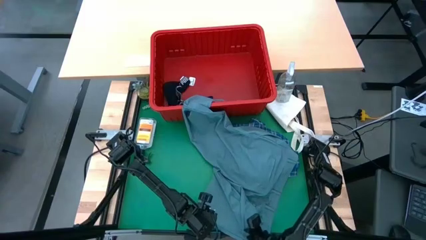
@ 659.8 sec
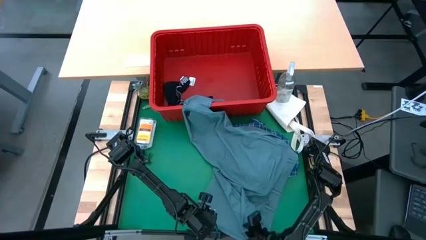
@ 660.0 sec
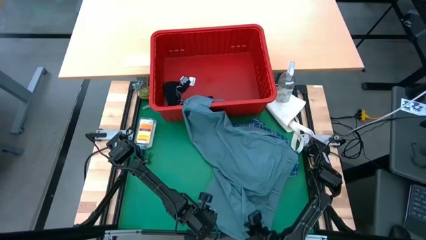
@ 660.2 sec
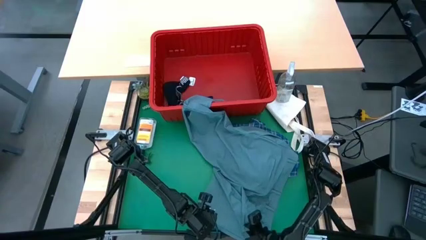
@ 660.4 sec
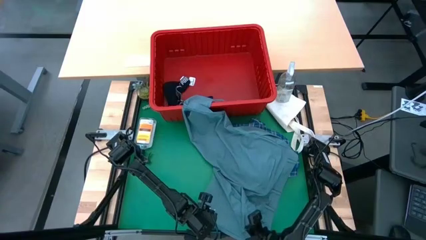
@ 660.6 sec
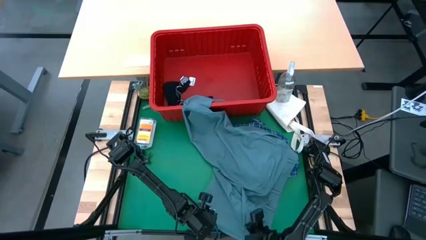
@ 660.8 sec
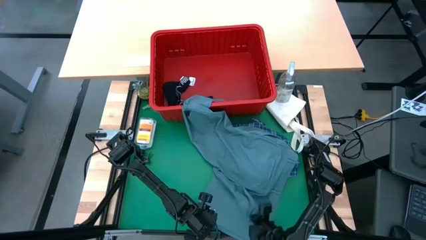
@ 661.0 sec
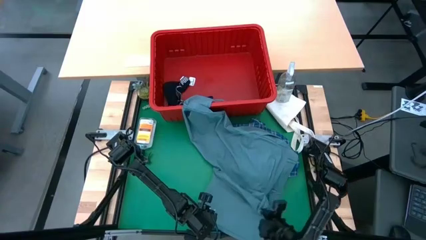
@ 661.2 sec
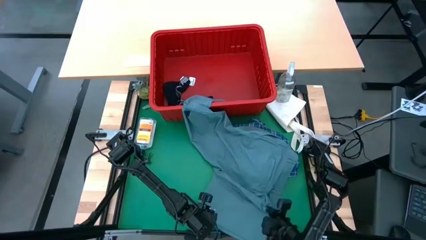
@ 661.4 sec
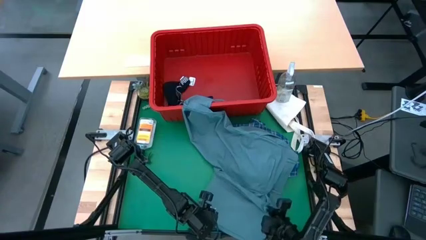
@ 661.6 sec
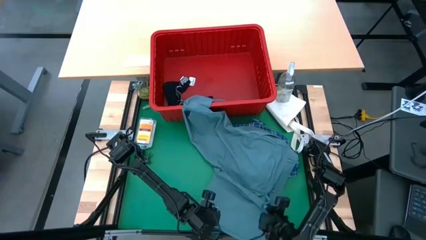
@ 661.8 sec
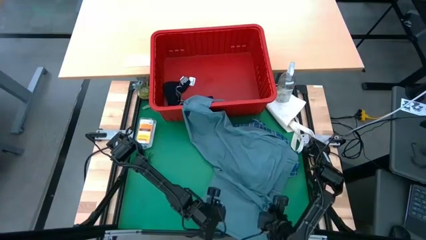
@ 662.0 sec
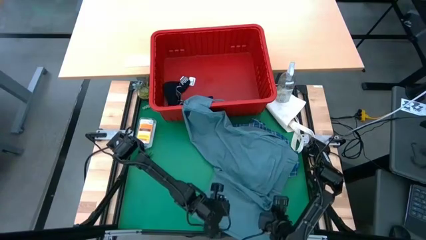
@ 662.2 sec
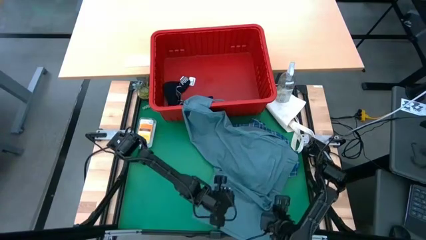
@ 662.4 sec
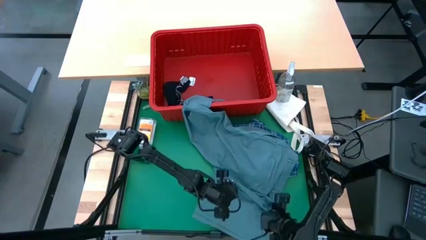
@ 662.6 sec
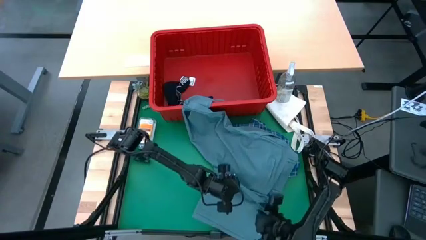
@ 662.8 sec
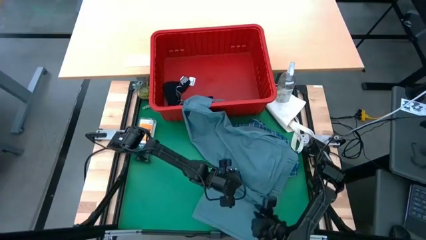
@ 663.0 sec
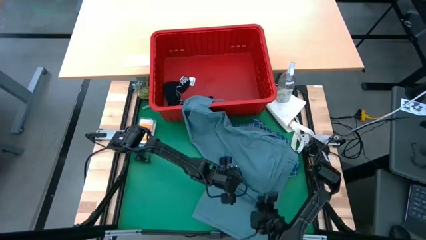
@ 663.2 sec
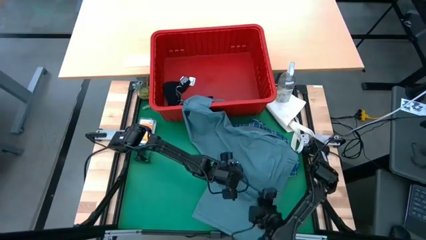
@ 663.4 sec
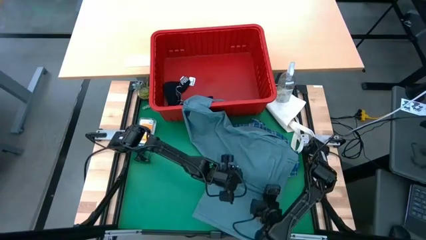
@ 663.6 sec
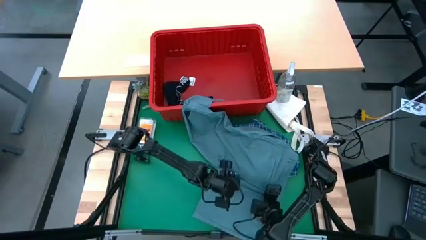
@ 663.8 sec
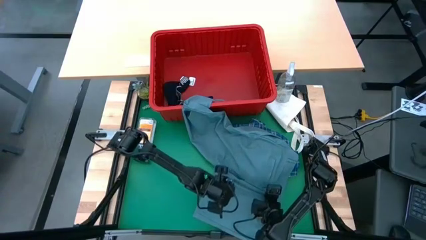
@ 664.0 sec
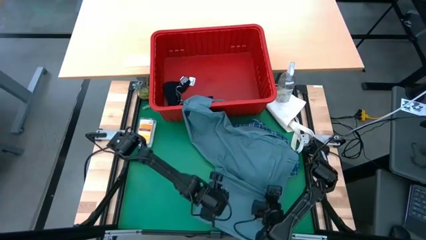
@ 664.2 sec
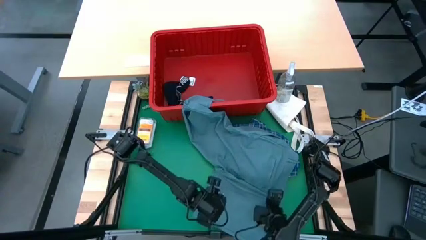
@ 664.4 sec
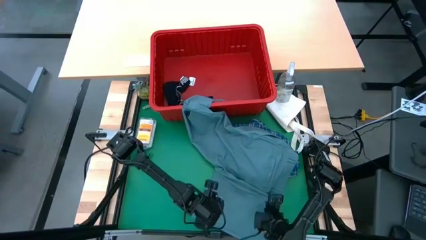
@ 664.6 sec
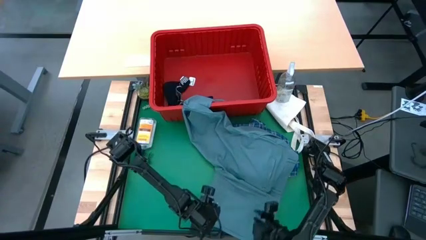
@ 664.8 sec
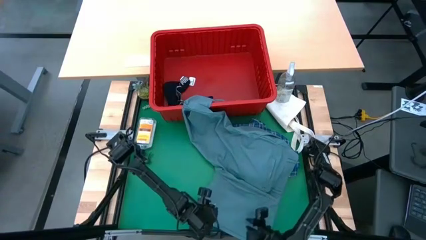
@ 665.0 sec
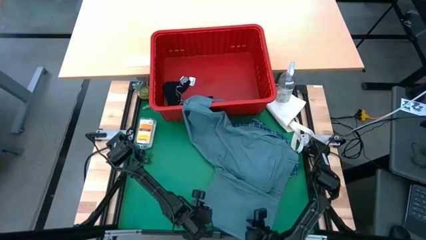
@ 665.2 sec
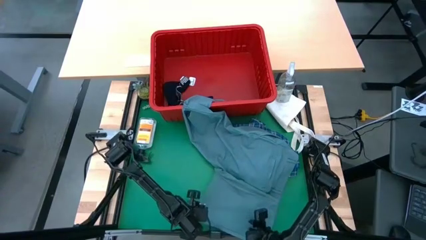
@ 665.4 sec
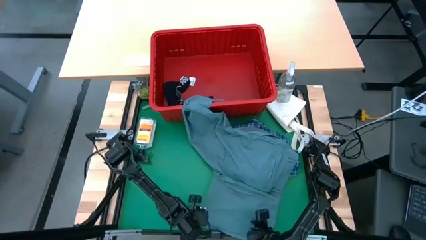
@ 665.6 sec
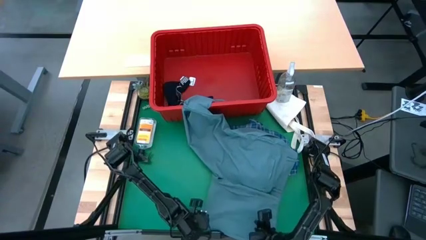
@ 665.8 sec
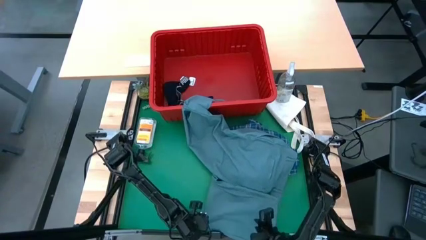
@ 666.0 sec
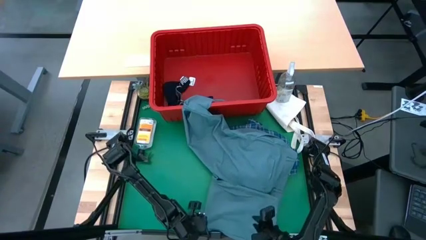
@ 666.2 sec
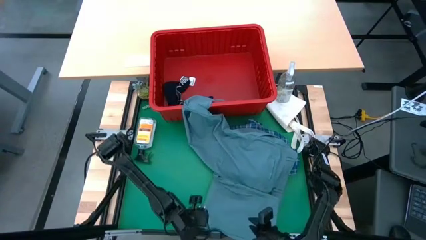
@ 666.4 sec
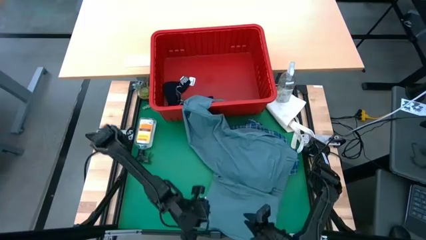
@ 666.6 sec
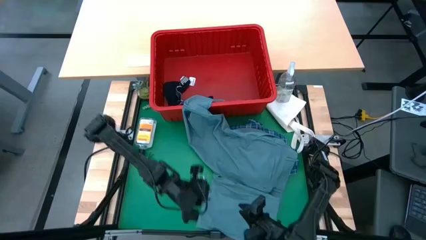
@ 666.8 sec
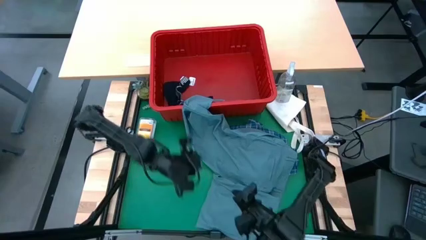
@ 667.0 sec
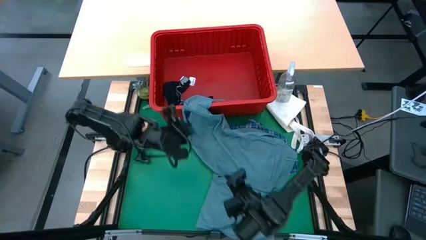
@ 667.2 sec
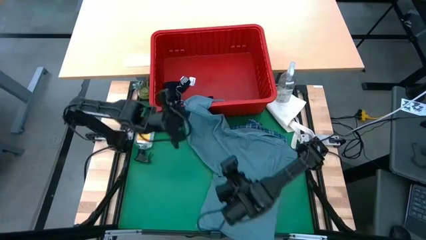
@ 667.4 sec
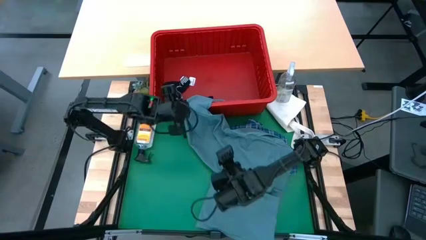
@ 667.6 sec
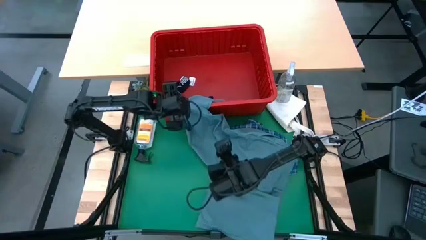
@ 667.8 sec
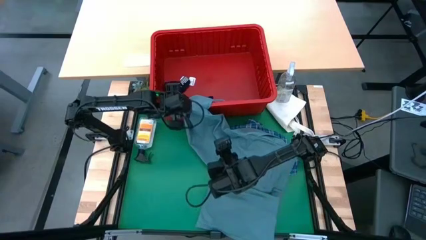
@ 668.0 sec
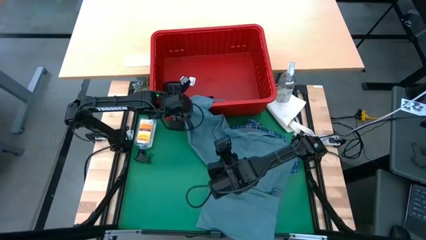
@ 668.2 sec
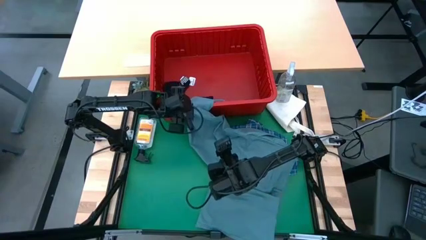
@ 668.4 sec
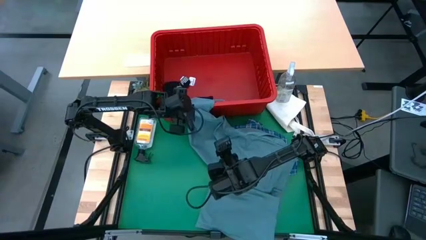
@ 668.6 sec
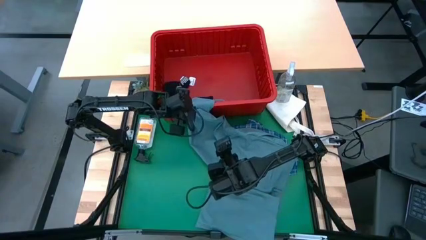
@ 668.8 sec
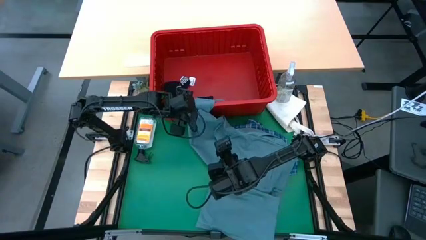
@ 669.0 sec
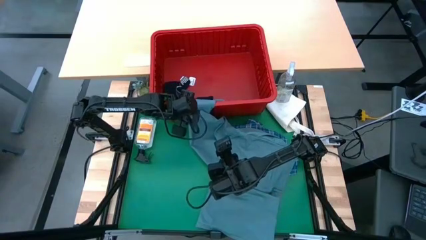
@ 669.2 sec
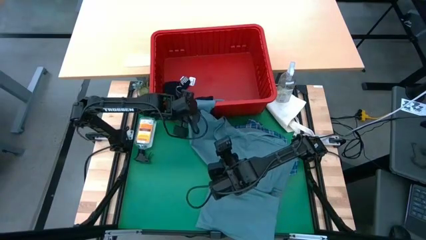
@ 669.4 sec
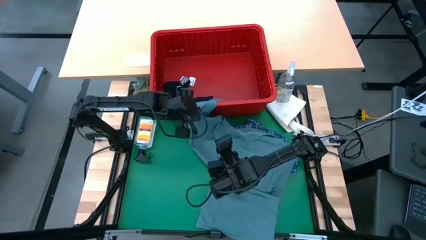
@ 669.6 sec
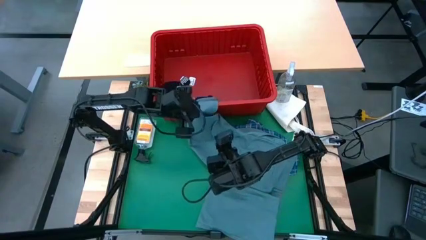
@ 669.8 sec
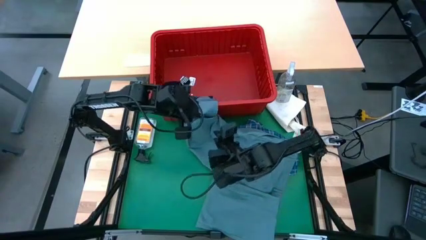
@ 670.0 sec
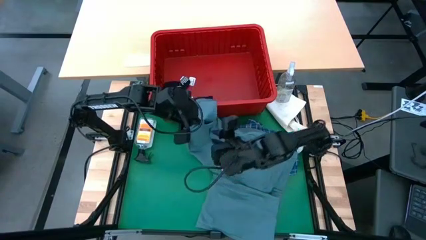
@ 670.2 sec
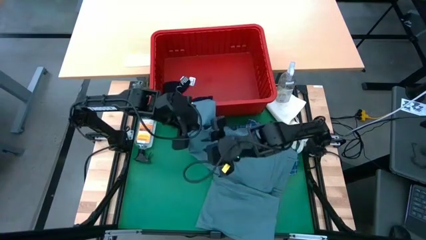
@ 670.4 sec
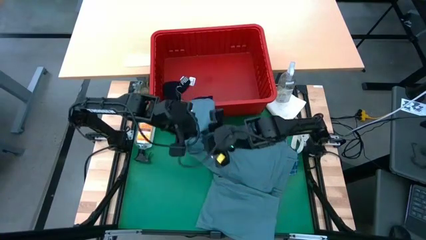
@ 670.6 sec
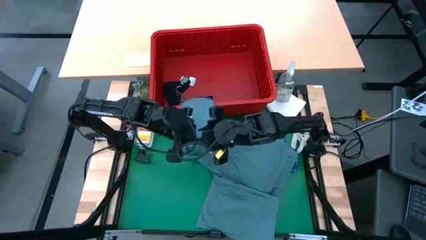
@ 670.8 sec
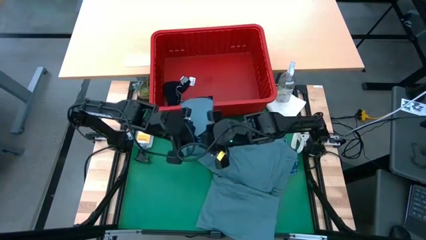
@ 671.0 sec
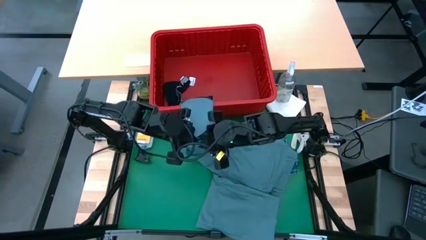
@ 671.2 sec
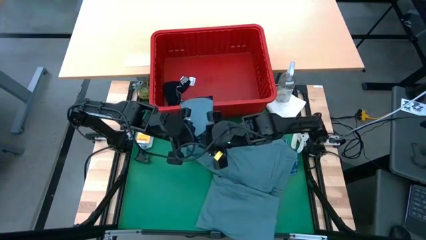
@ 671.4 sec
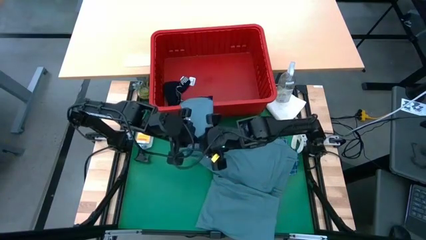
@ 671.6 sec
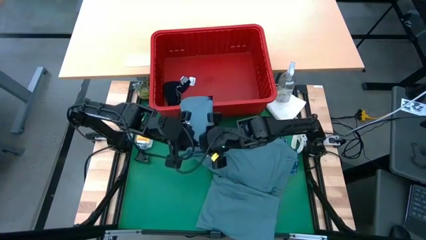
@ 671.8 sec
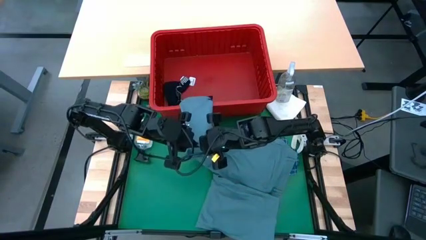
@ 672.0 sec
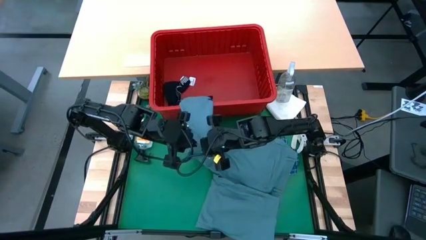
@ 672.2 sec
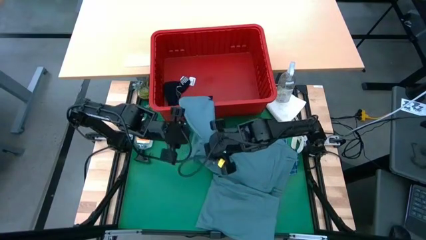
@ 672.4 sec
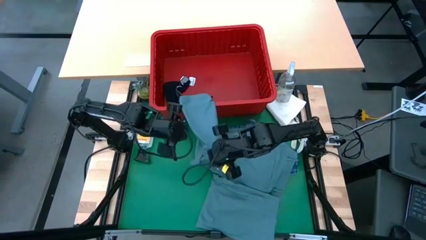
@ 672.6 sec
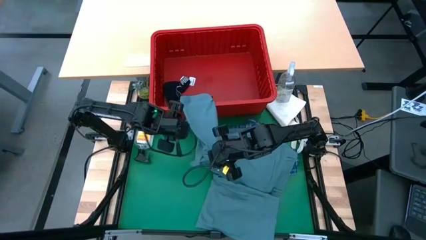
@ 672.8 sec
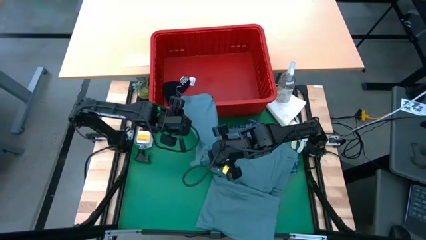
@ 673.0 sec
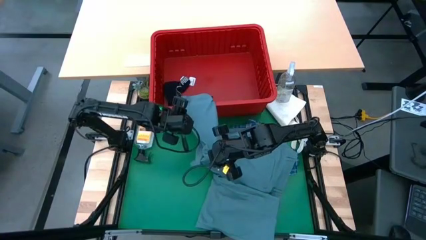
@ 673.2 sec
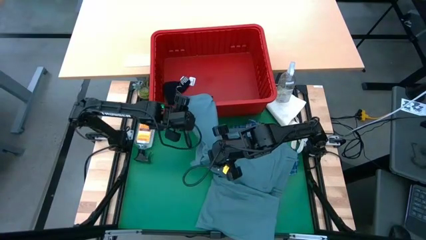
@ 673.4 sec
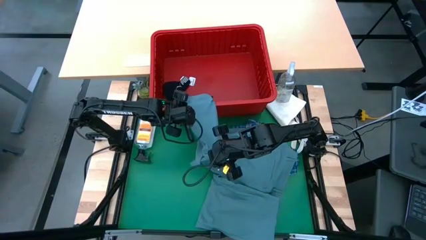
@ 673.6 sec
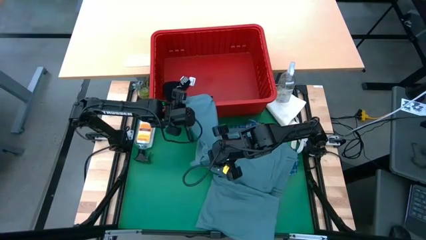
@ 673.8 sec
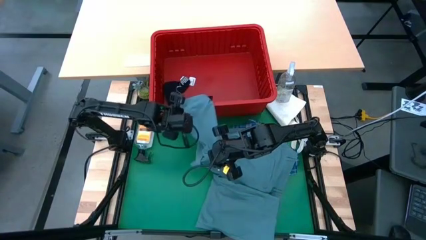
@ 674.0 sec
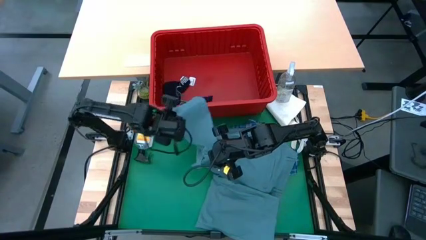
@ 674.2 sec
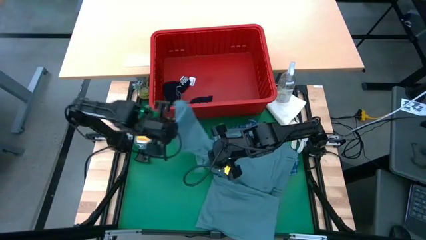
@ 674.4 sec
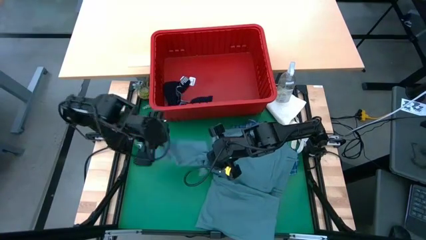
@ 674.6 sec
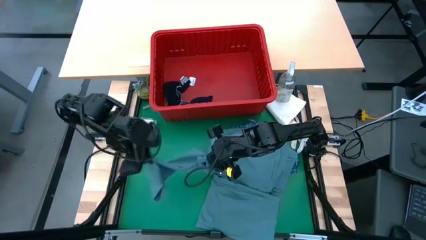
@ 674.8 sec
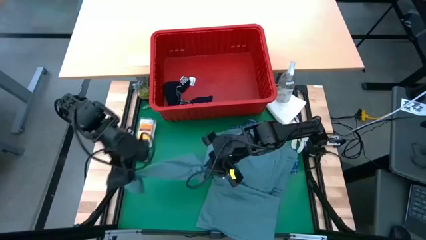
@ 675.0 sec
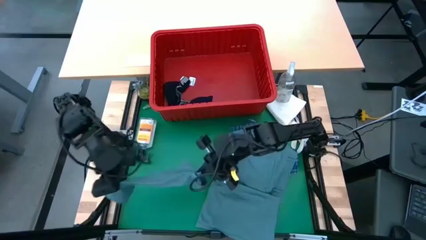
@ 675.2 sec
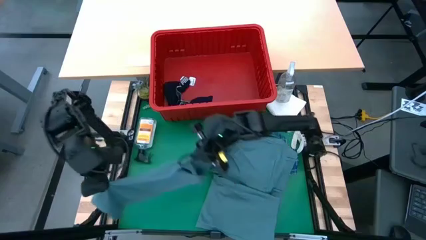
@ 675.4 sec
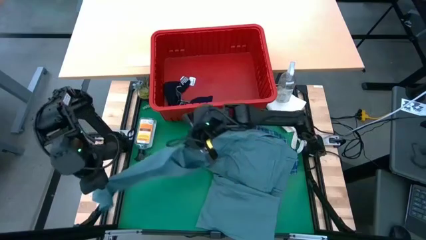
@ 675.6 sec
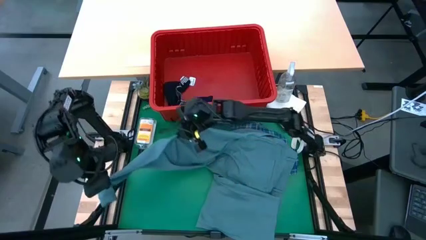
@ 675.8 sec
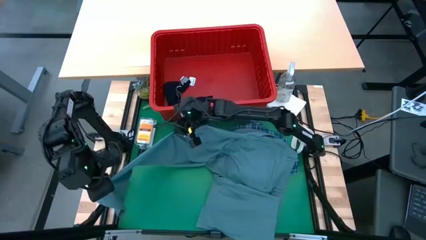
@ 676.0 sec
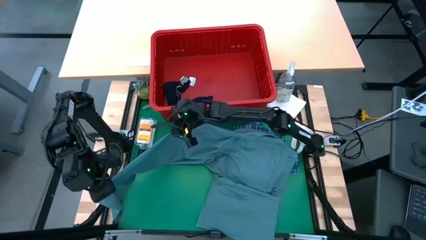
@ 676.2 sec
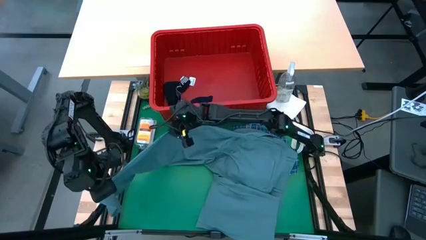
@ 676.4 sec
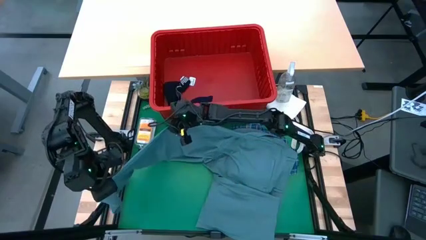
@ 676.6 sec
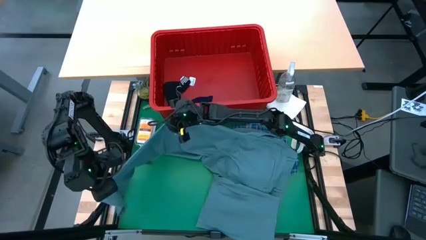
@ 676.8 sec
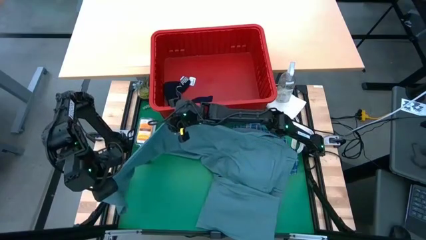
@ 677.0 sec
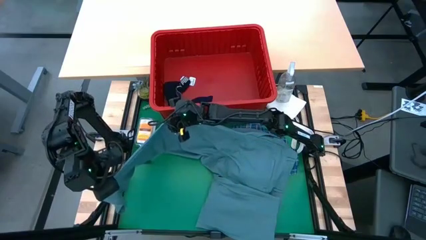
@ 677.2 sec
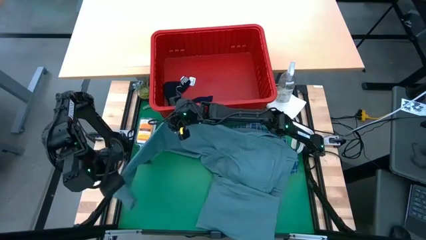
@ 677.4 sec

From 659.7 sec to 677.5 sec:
Task: Fold Laundry from Bin
Fold the blue pants on top of the blue shirt
